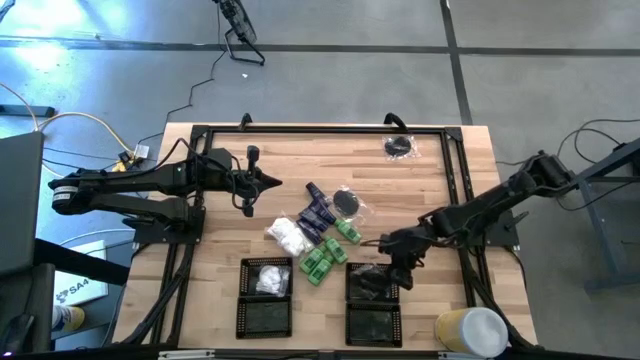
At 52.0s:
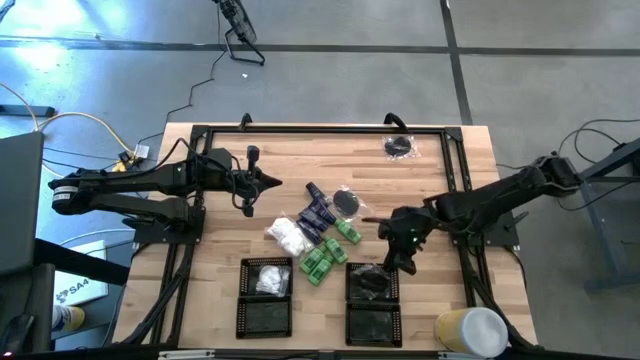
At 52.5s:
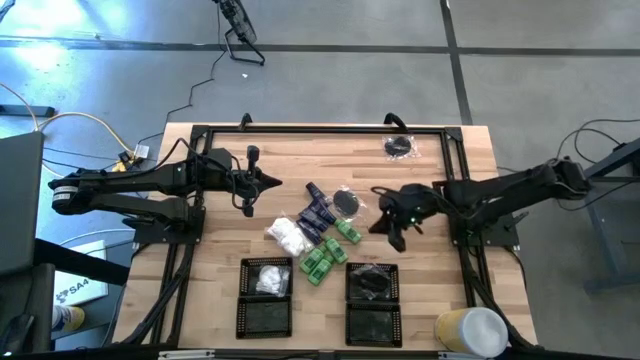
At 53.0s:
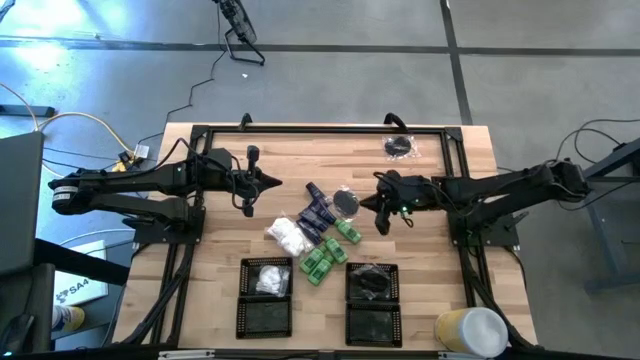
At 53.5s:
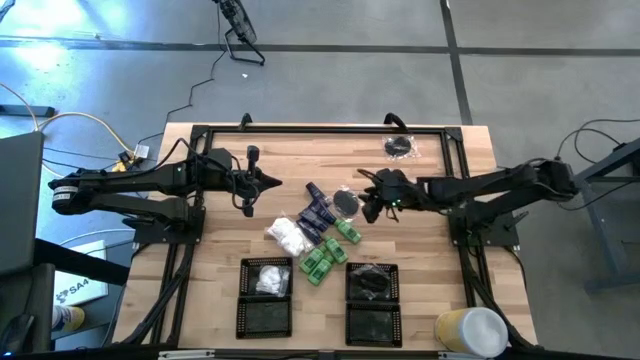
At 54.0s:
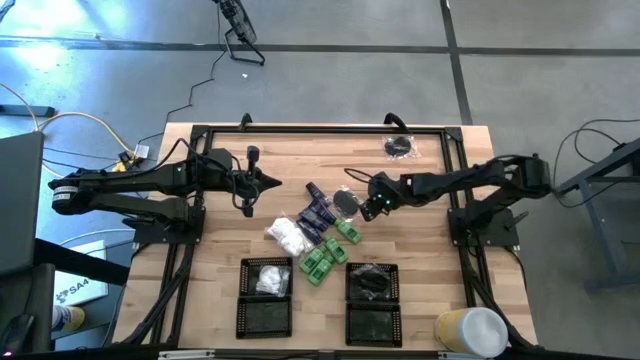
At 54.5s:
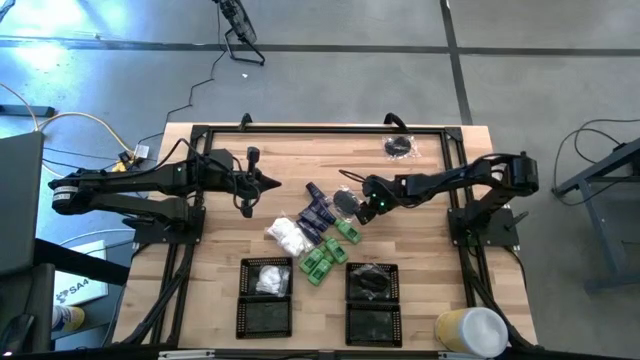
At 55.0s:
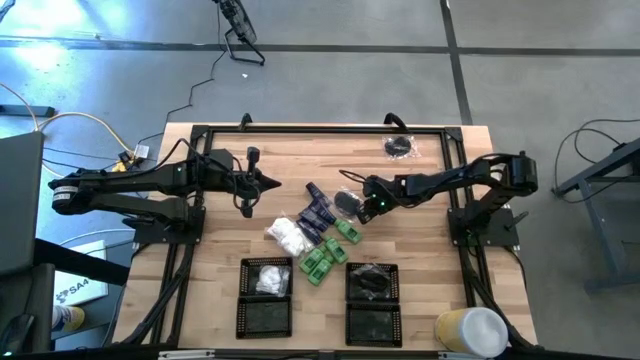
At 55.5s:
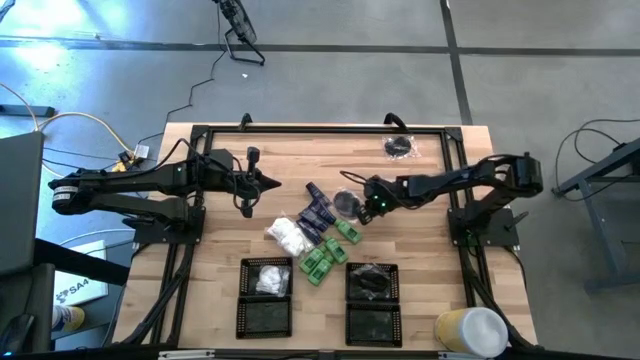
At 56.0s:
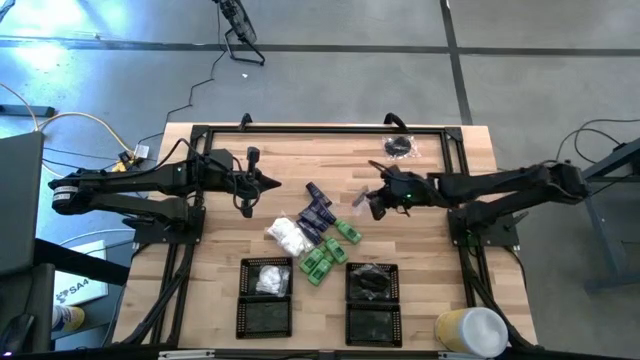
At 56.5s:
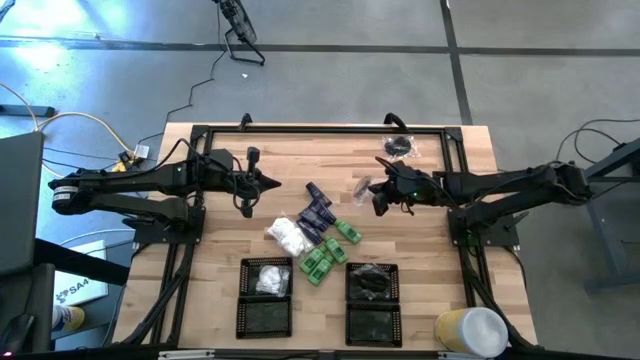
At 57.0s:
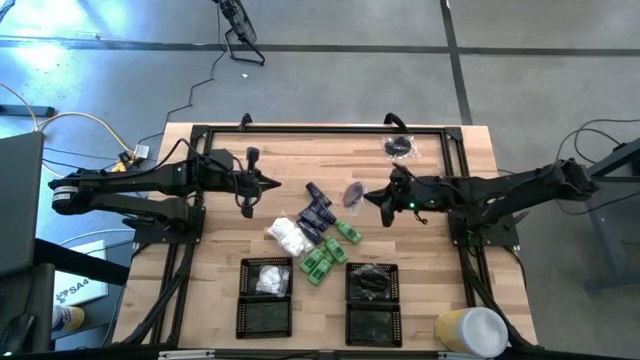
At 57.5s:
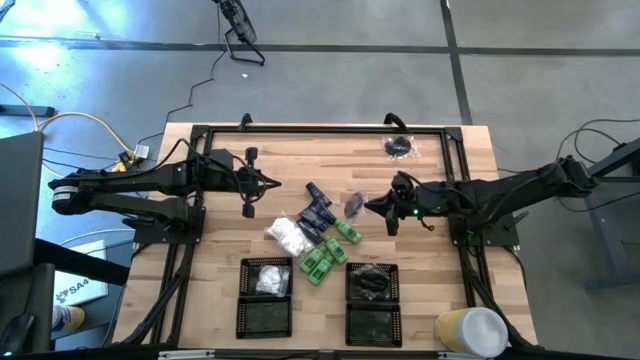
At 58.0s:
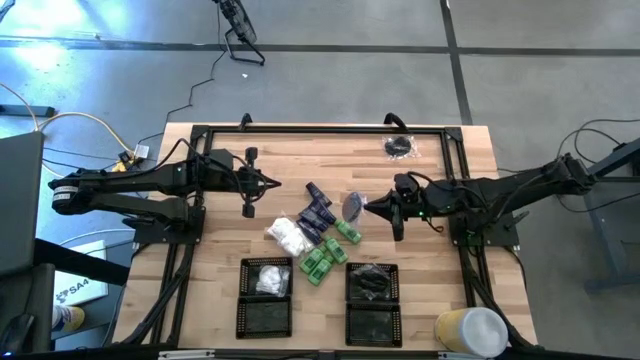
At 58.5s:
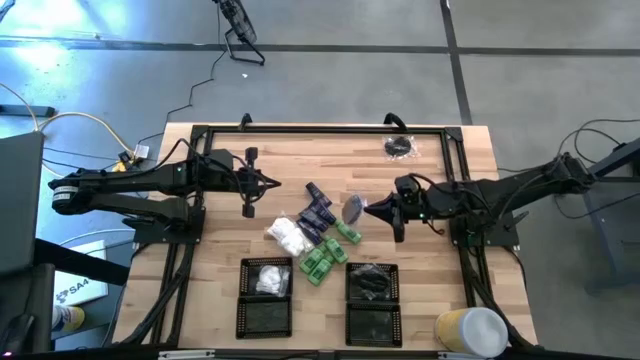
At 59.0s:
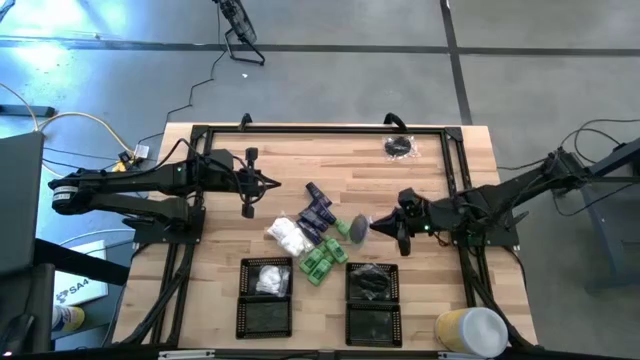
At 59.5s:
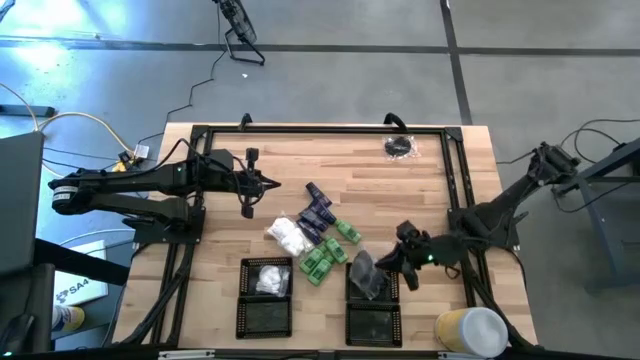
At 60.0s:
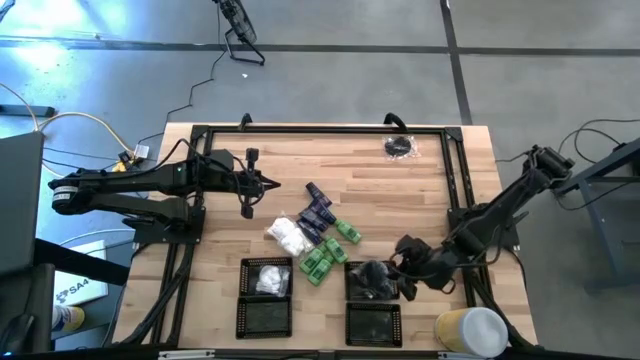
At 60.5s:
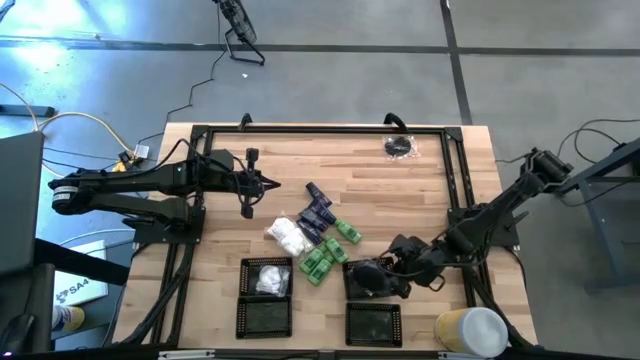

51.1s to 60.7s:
Task: Pick & Place Travel size toiletries
Put the black hairbrush into the top right black bin

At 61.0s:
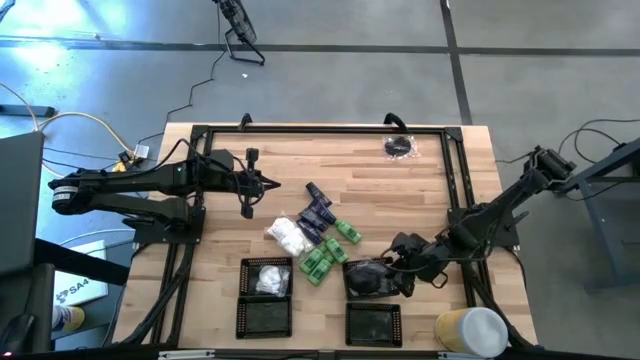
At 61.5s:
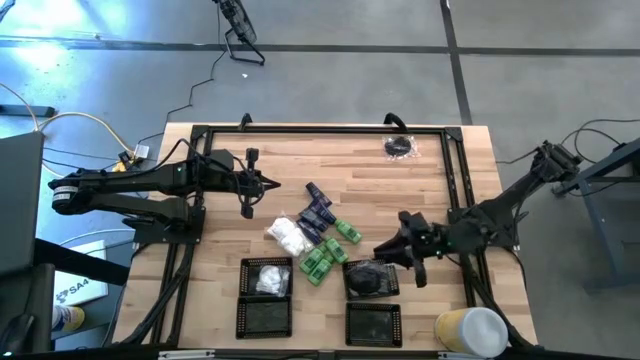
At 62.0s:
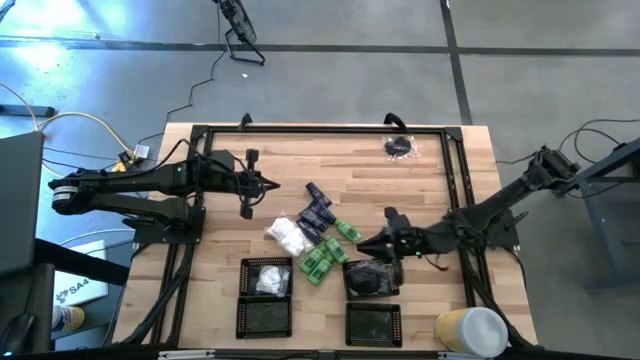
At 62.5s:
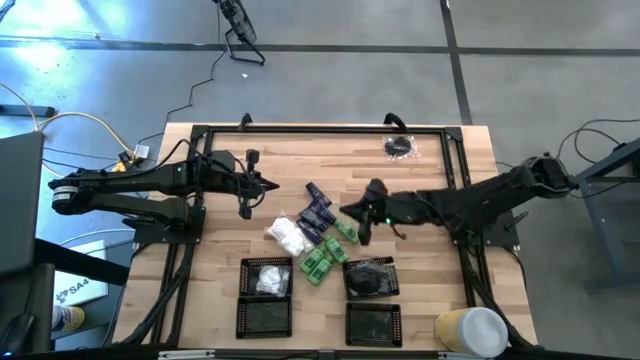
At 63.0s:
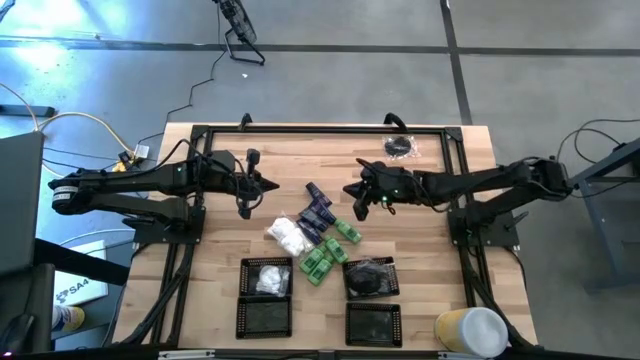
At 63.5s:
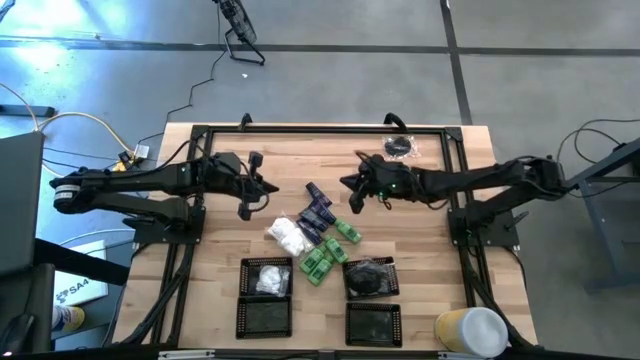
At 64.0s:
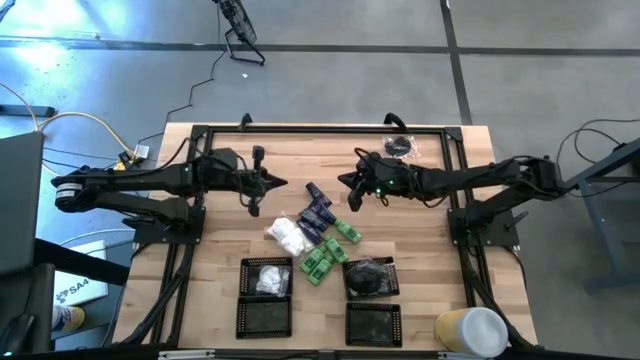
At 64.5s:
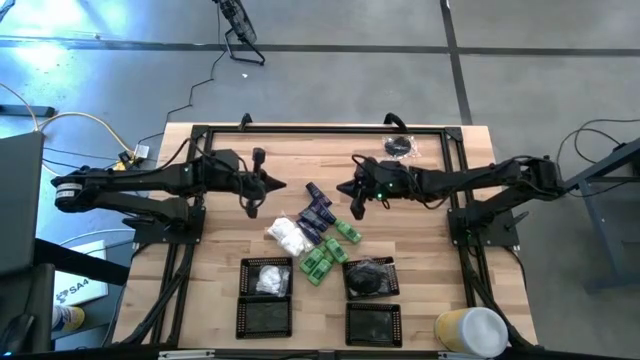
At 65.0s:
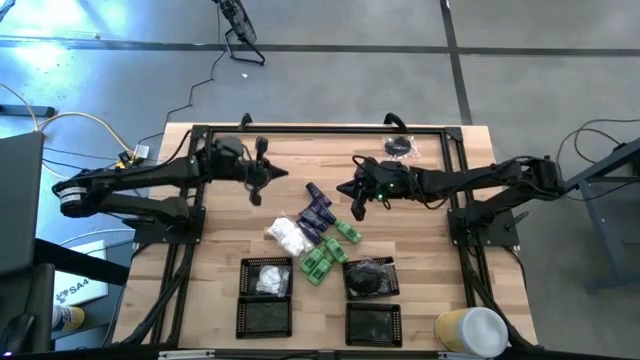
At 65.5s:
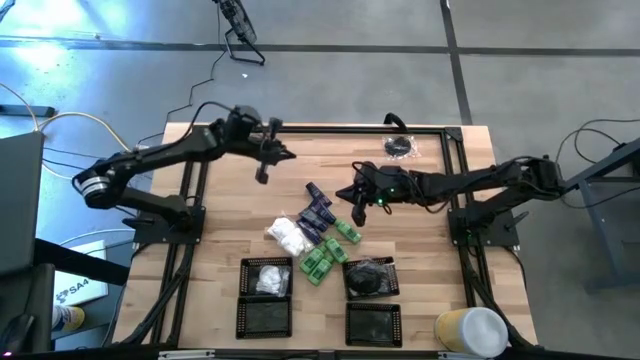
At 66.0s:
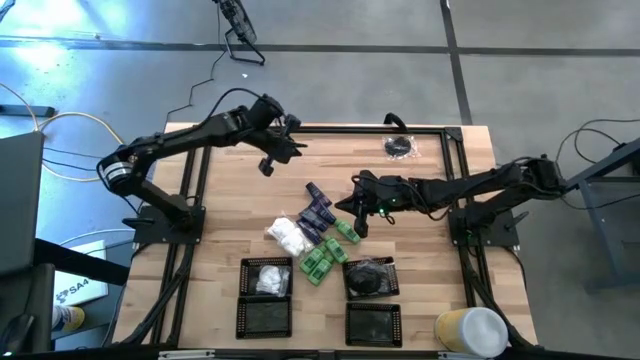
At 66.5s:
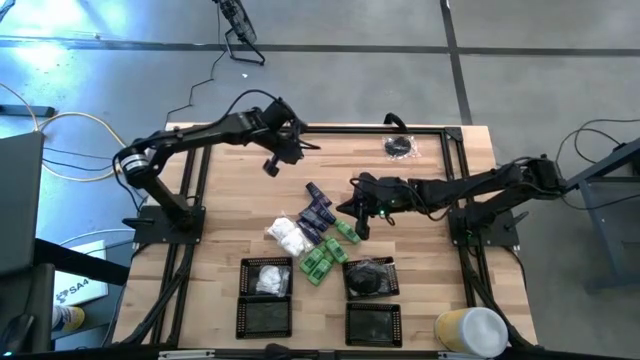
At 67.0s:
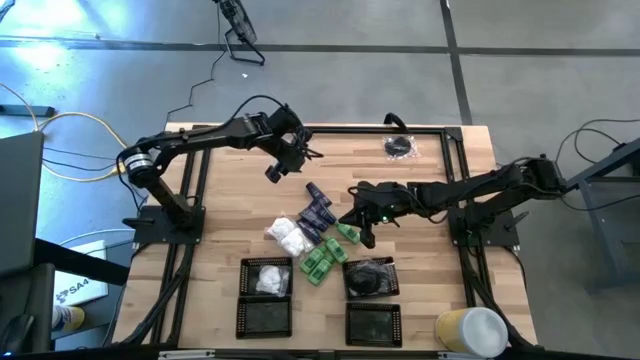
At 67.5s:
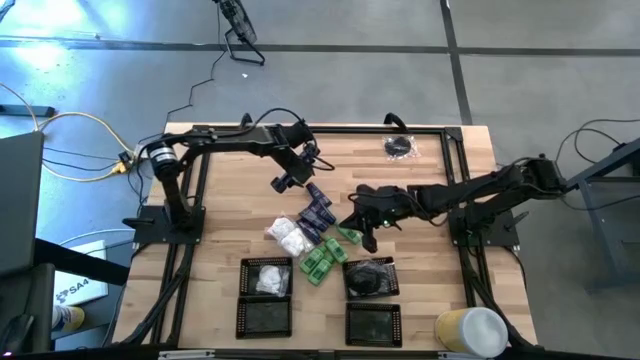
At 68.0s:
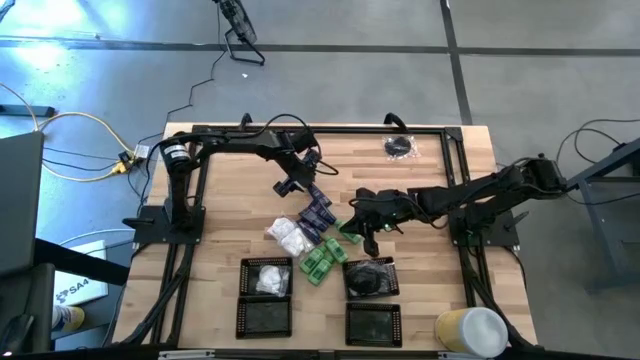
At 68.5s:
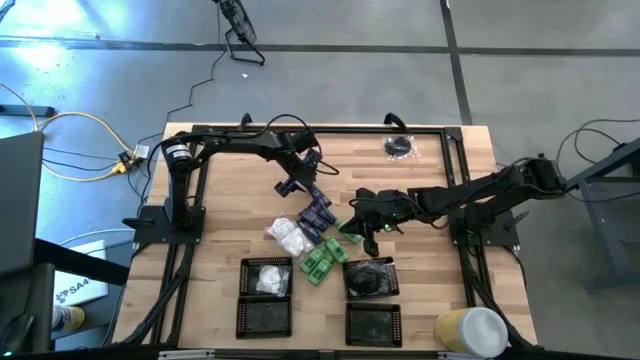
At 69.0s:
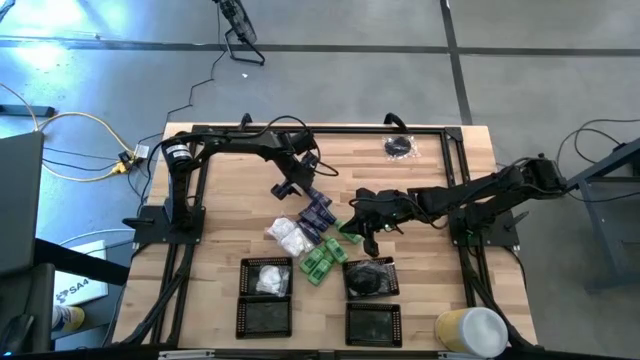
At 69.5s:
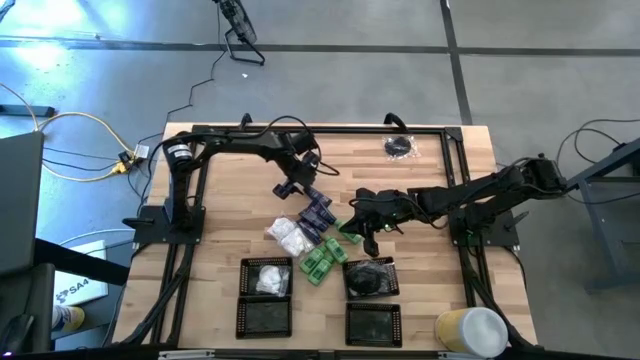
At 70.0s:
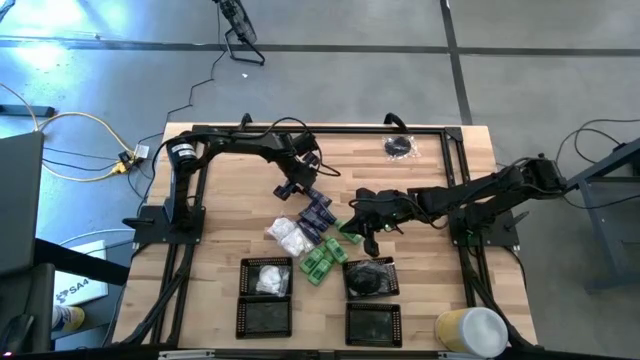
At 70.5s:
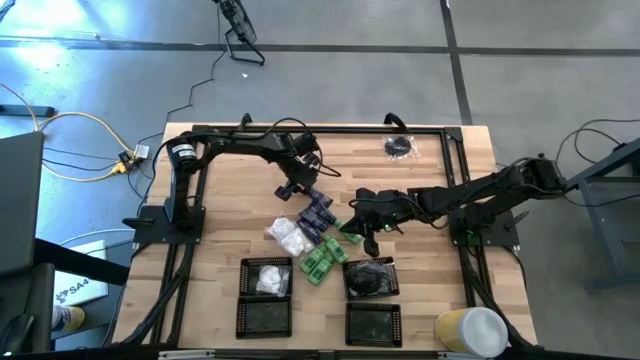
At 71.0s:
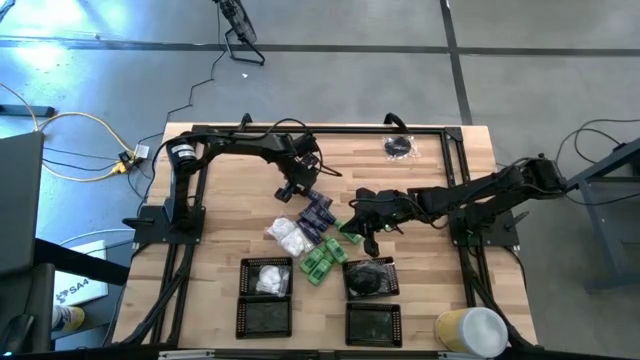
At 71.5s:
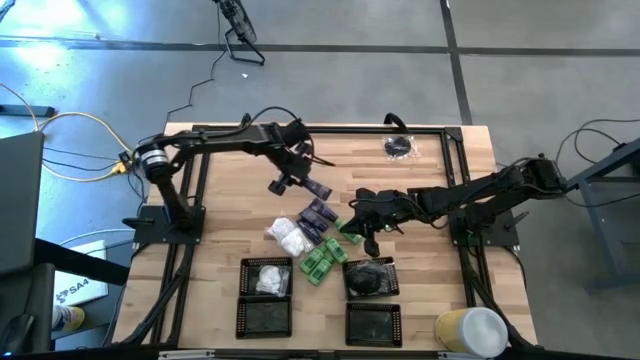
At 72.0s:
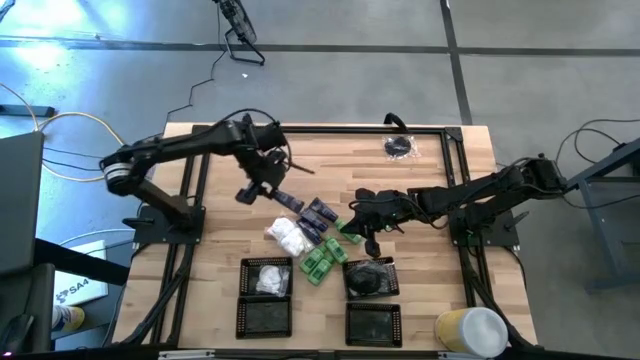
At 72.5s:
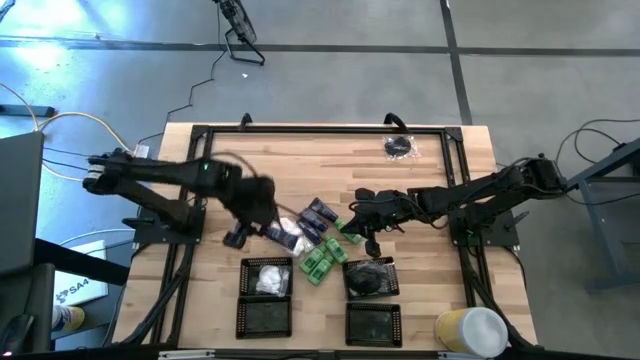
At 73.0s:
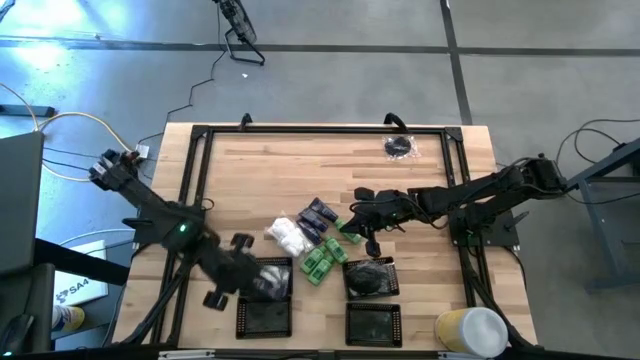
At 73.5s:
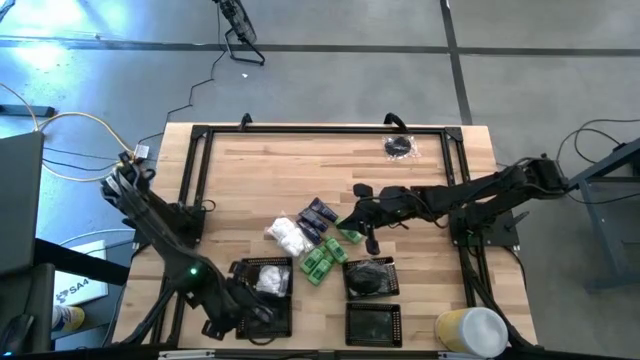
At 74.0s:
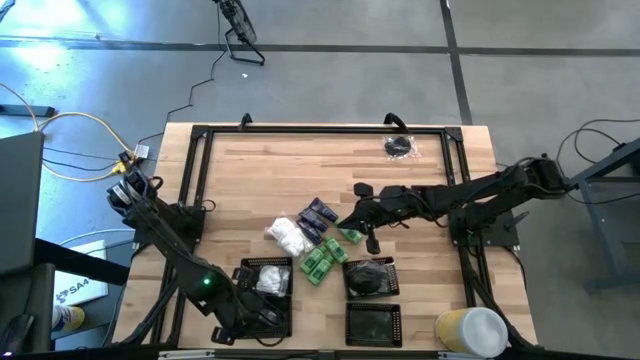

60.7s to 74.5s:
Put the black shaving cream into the bottom left black bin
